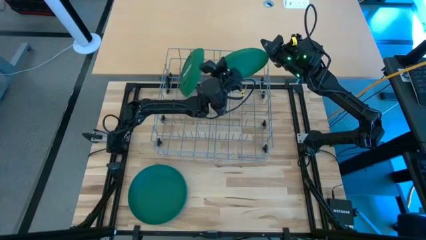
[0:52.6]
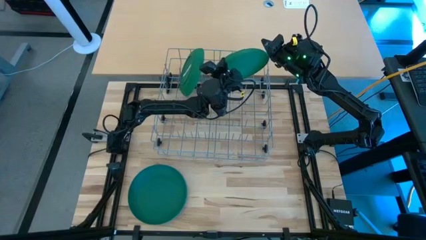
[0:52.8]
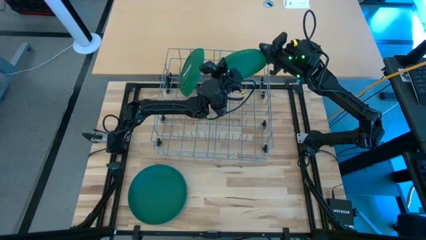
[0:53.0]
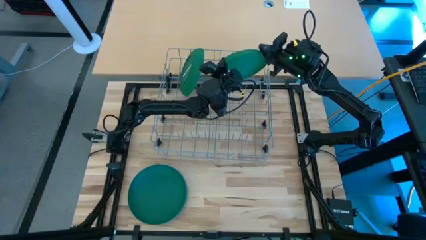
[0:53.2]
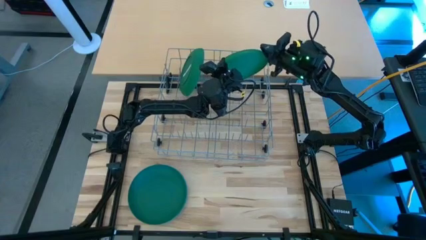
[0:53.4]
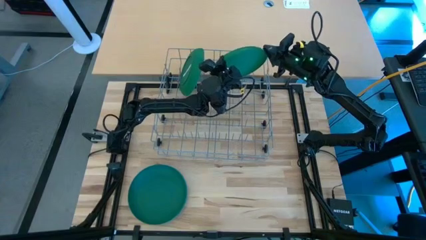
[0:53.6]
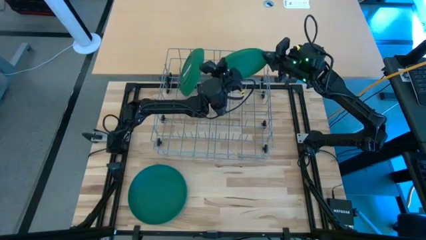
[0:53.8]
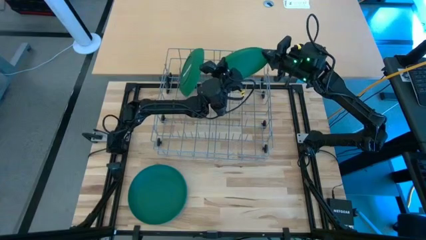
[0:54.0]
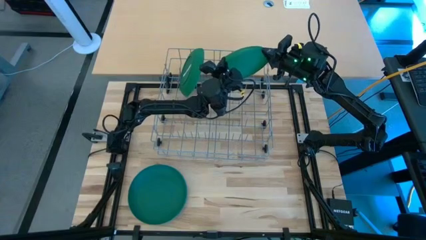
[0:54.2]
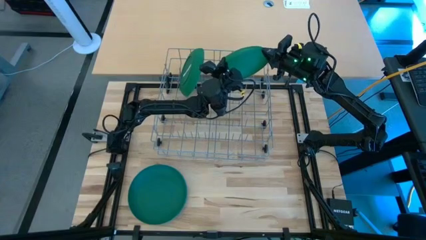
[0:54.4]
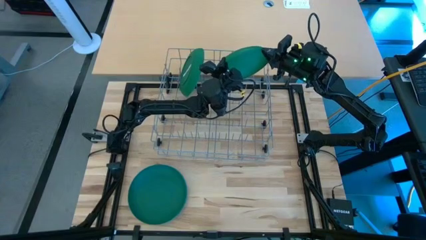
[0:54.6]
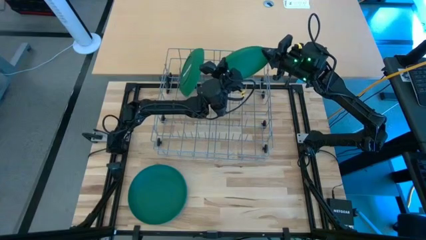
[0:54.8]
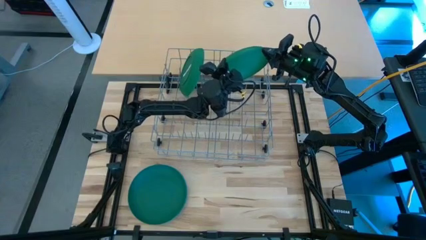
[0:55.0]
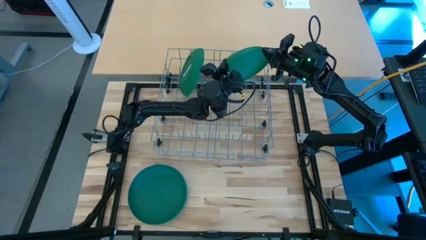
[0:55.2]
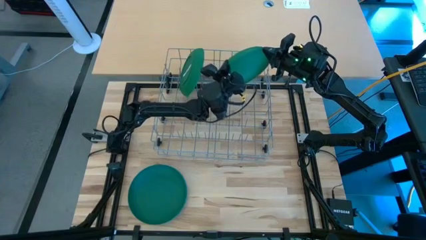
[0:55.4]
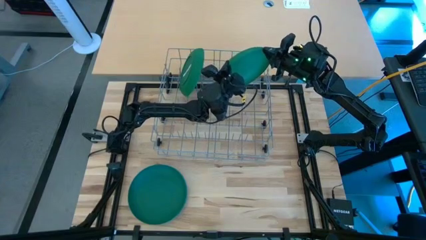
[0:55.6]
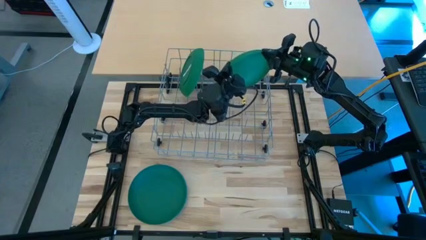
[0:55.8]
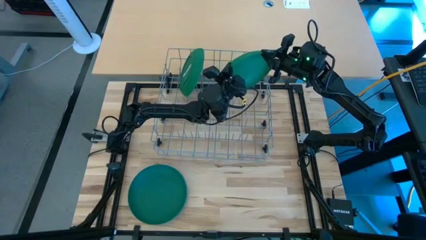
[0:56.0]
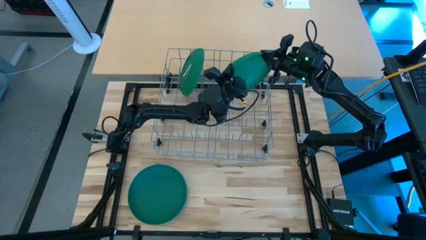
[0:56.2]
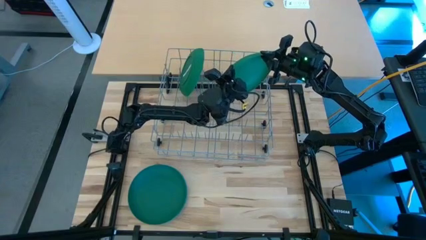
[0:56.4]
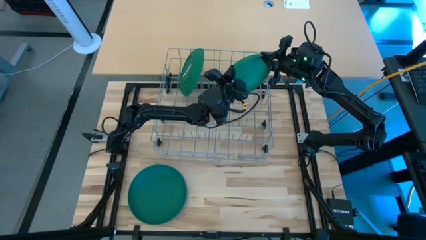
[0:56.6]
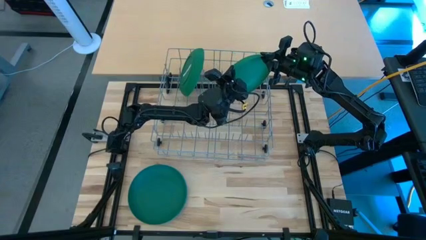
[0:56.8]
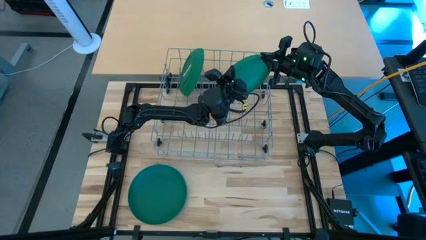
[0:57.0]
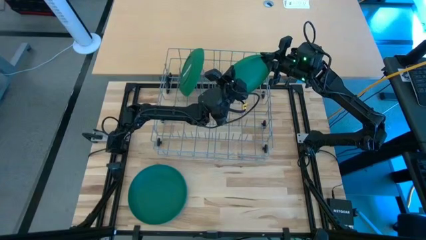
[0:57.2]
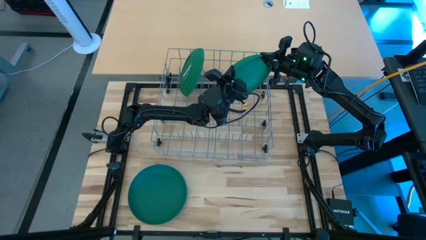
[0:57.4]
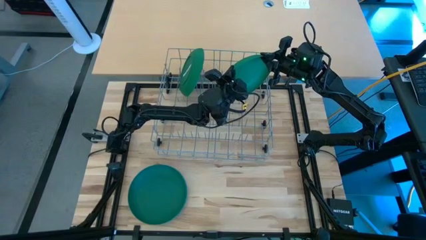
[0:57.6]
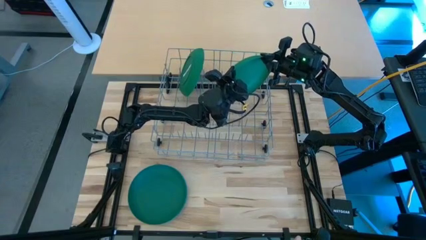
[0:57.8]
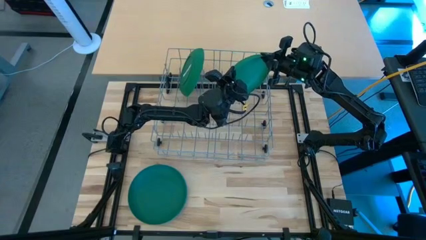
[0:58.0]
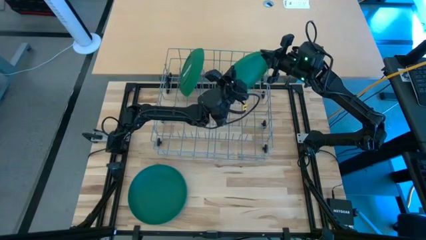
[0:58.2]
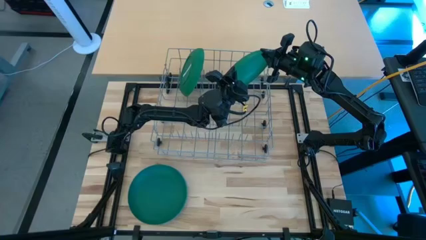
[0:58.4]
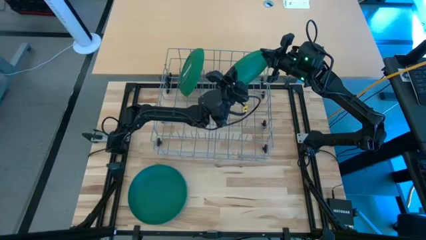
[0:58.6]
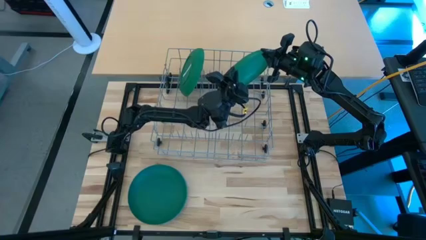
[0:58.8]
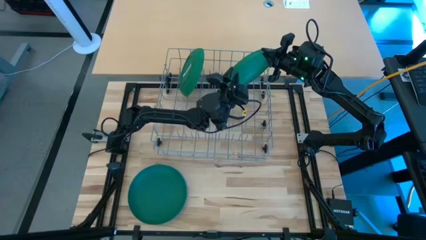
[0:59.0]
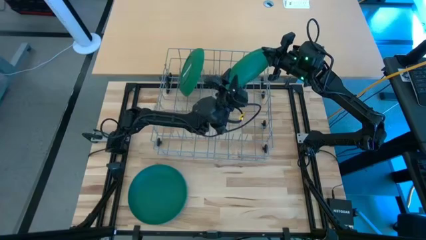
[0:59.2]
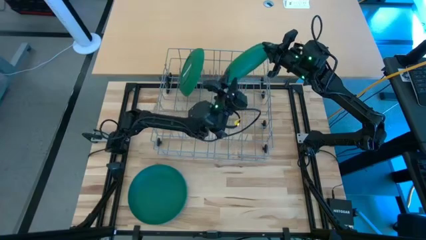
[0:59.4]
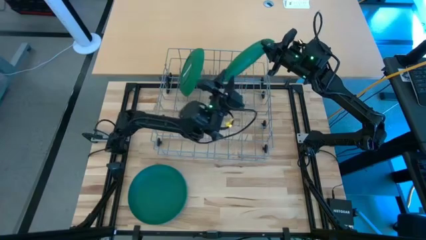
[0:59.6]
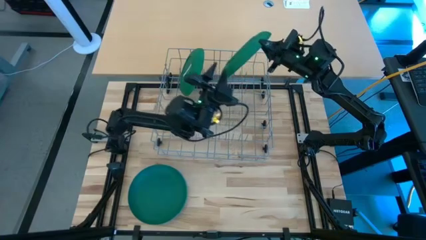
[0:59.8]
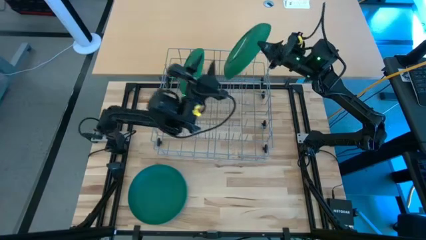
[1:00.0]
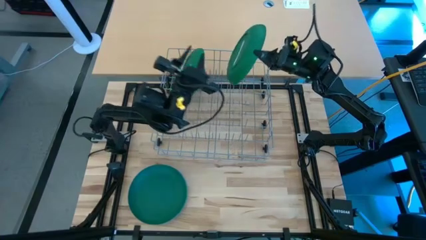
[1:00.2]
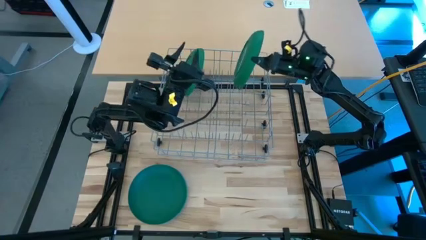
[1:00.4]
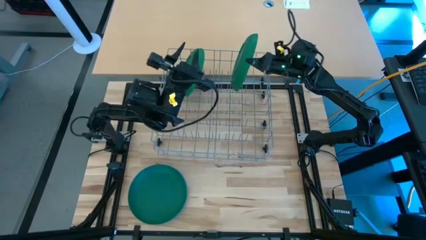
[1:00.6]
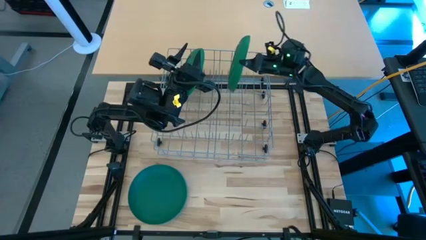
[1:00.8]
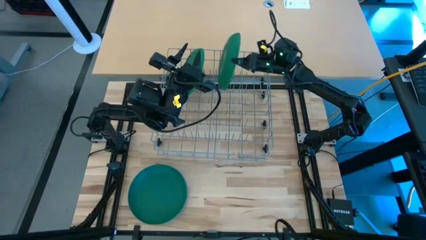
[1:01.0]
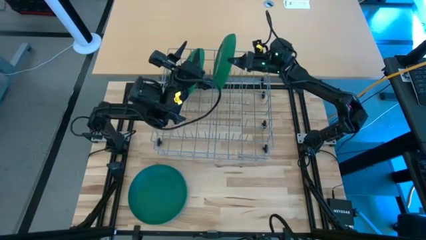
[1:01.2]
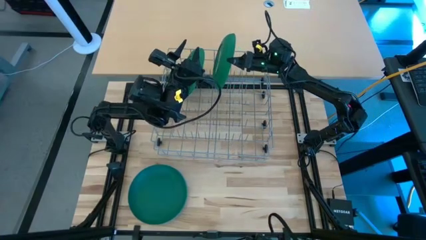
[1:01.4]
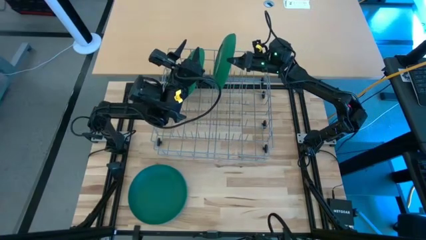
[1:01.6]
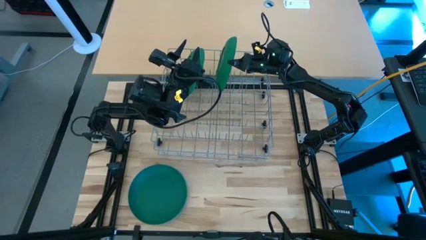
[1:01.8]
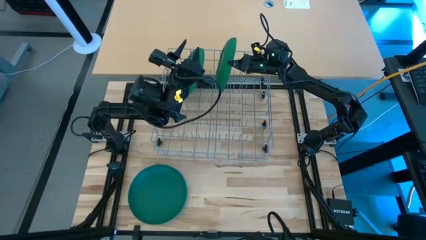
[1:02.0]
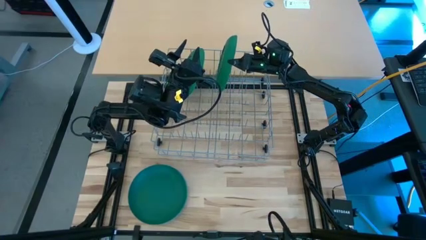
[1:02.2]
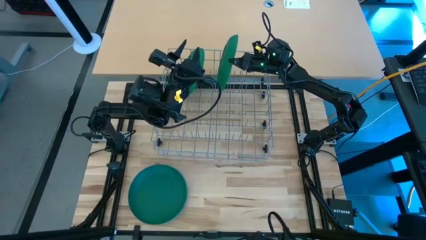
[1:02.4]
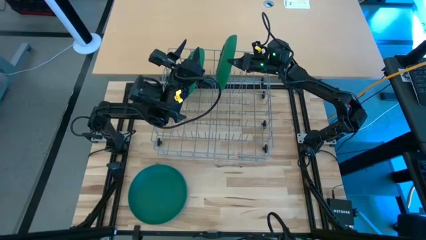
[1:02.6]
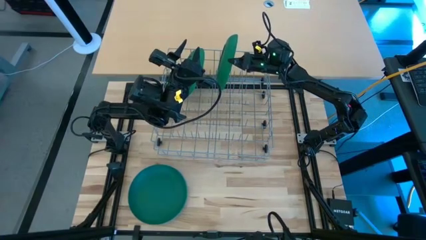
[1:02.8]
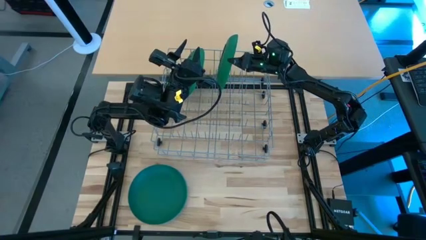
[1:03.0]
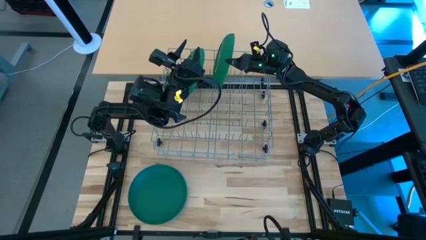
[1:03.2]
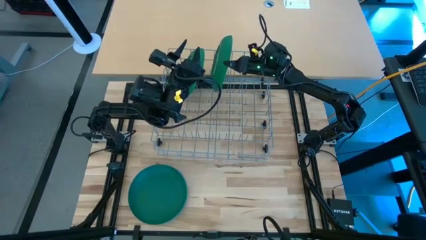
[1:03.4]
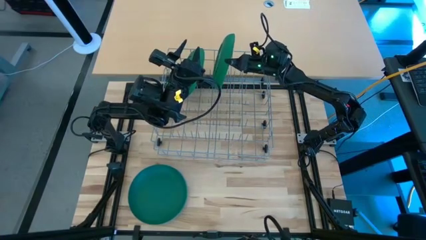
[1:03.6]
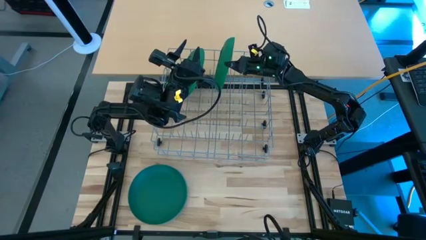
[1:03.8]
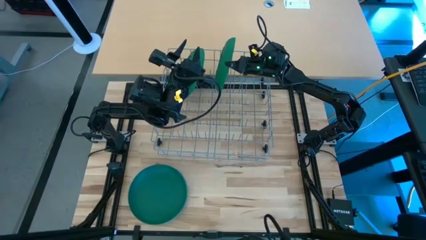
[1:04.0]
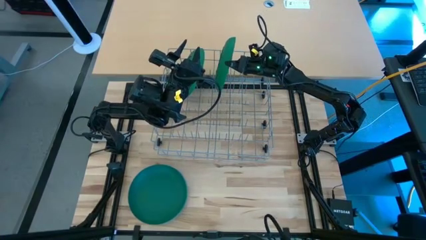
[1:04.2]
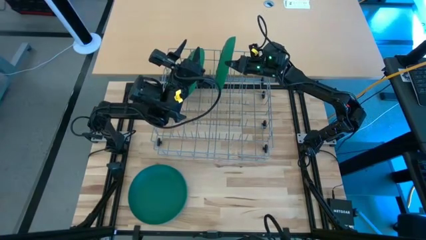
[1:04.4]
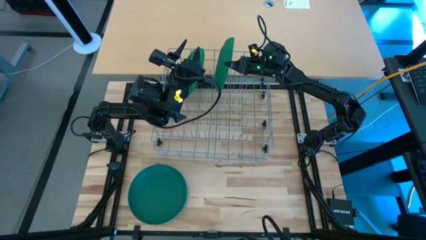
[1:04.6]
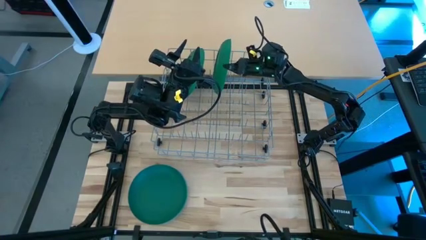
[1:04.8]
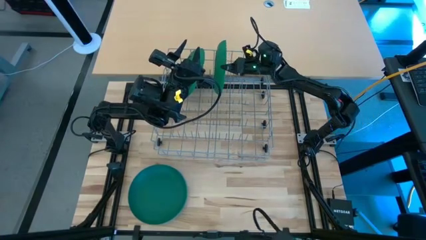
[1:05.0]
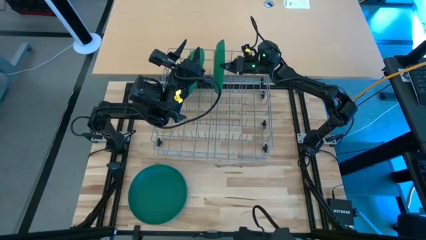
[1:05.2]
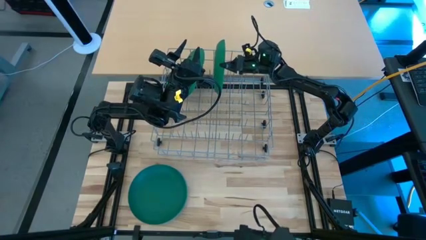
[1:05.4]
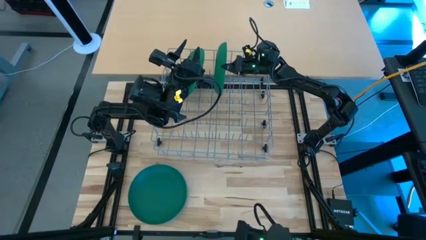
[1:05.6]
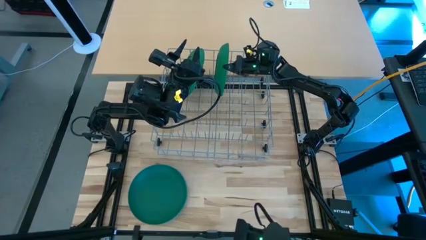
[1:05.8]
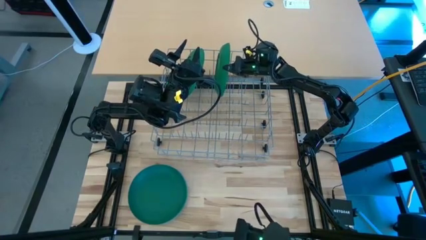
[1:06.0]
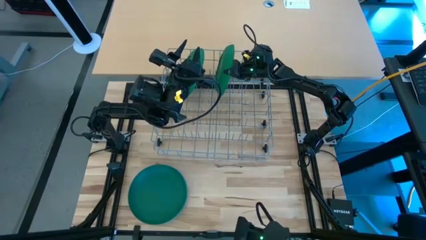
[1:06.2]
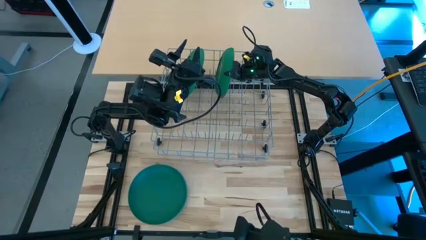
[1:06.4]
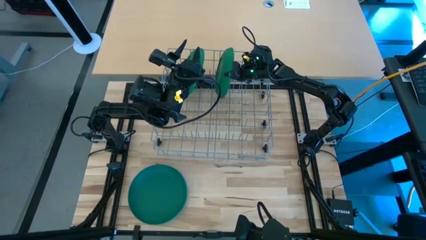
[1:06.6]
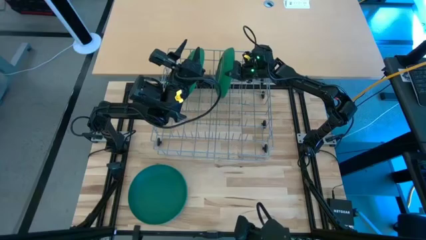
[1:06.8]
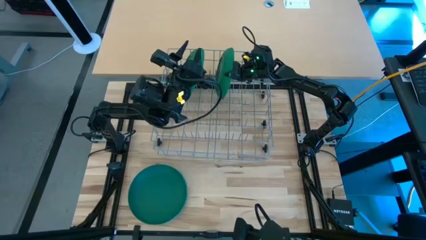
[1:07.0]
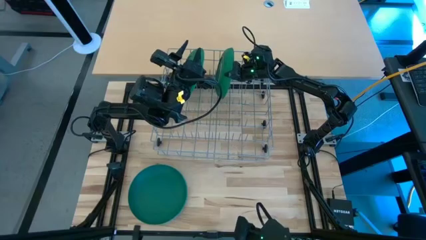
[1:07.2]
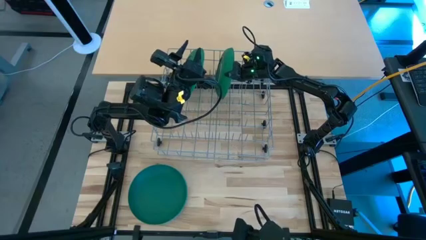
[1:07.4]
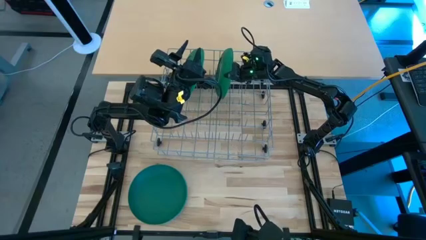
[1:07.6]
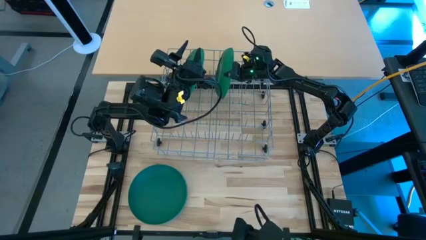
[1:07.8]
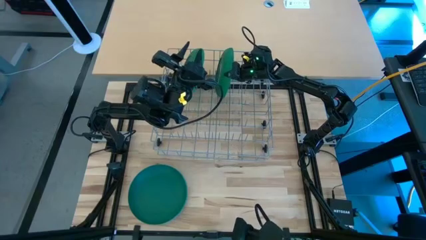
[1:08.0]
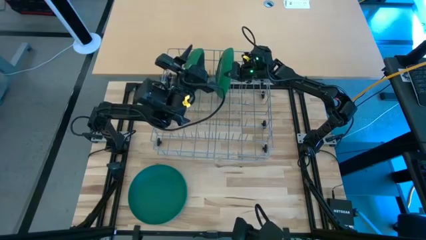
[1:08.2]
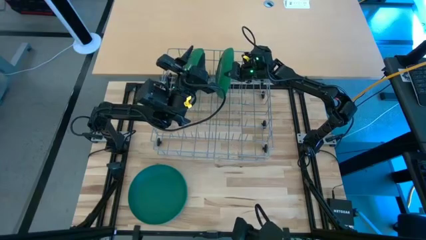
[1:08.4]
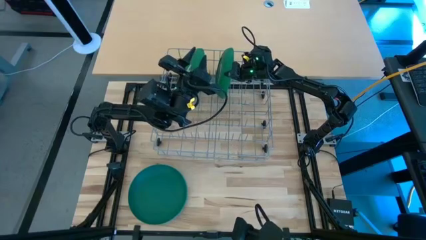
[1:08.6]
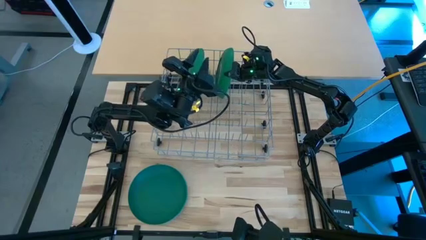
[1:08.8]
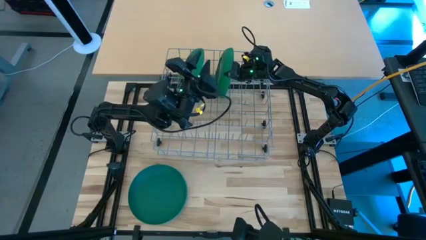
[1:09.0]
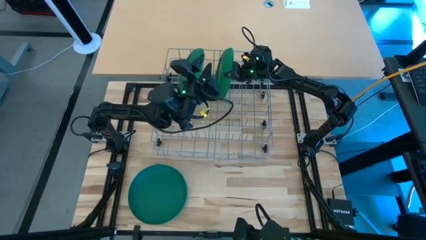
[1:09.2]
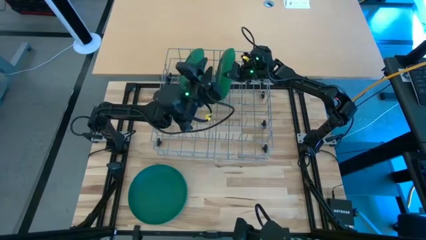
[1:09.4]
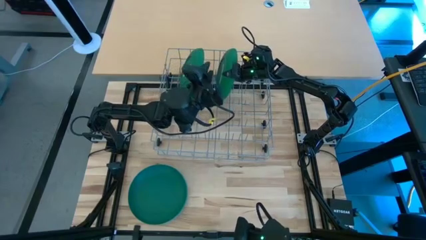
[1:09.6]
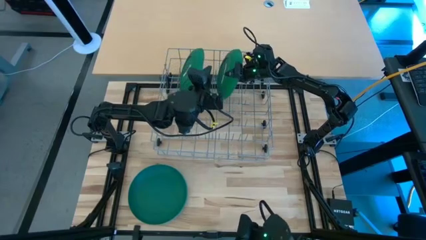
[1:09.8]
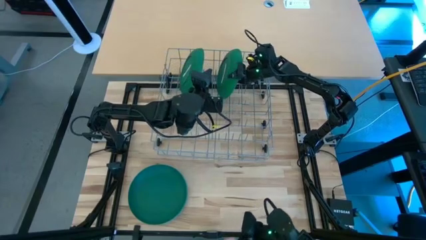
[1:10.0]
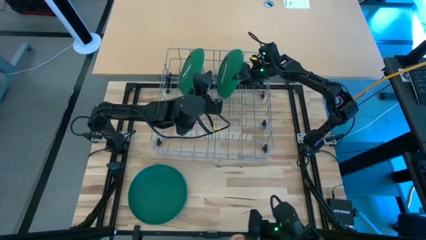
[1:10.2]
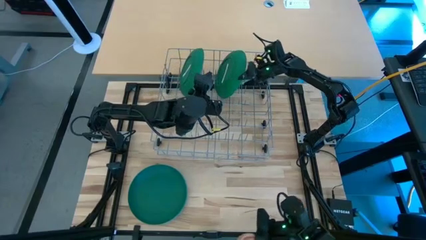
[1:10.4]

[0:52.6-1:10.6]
Task: Sort dishes
Put the right green plate in the dish rack
